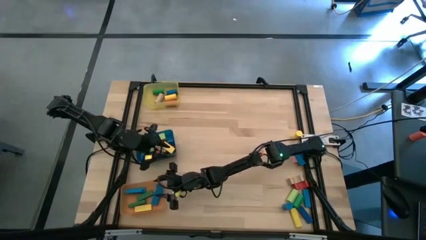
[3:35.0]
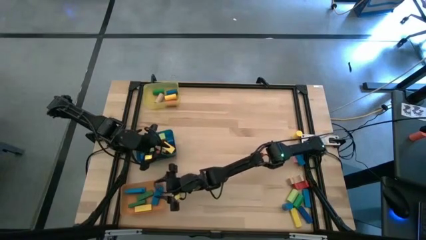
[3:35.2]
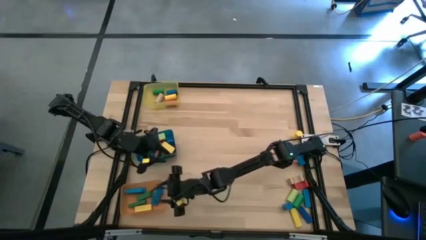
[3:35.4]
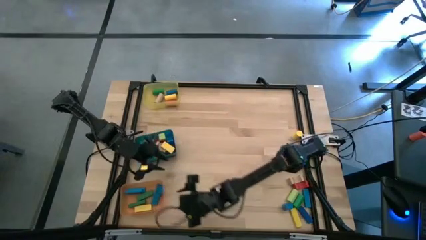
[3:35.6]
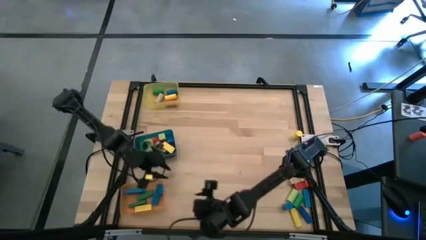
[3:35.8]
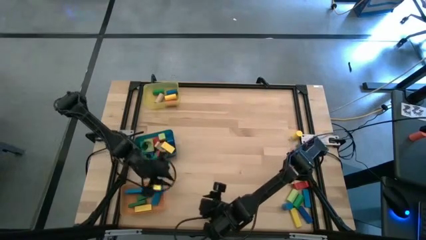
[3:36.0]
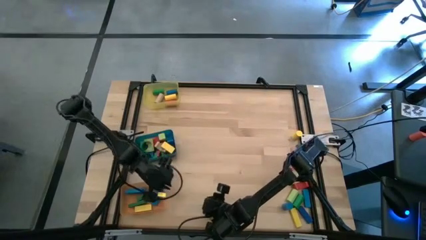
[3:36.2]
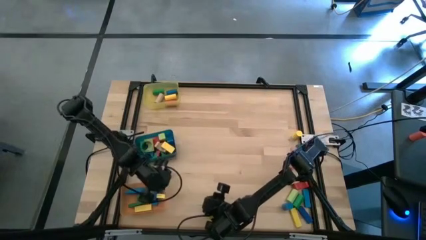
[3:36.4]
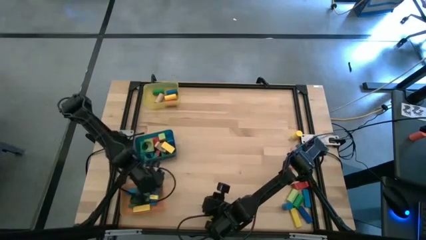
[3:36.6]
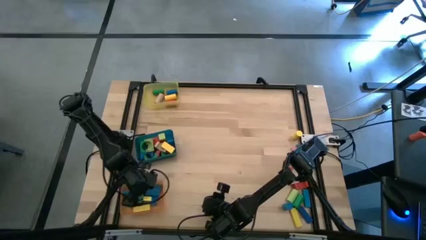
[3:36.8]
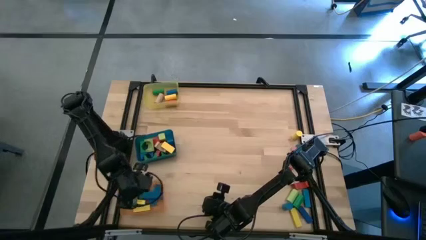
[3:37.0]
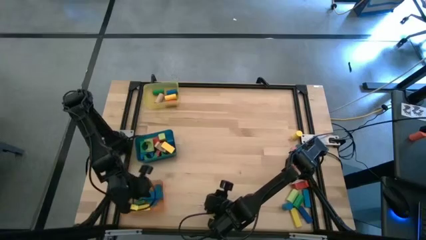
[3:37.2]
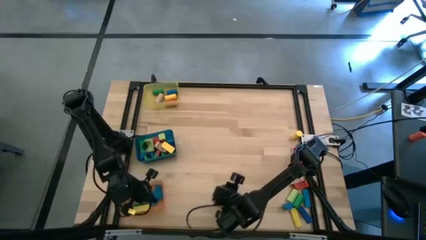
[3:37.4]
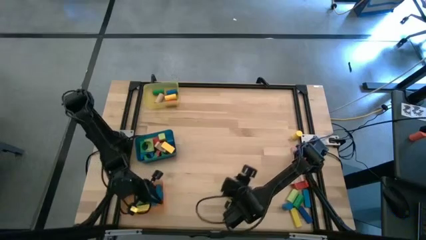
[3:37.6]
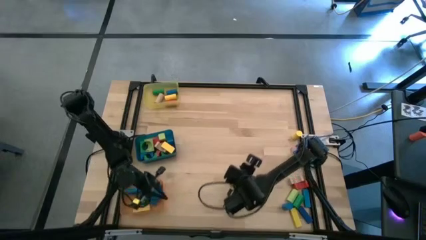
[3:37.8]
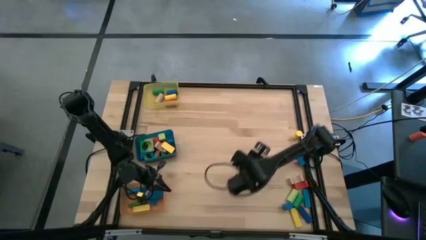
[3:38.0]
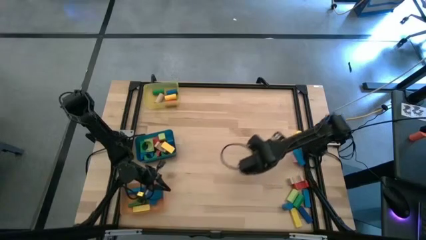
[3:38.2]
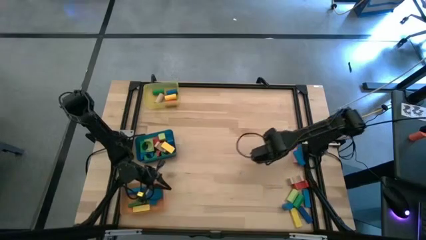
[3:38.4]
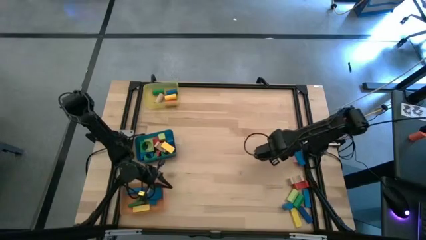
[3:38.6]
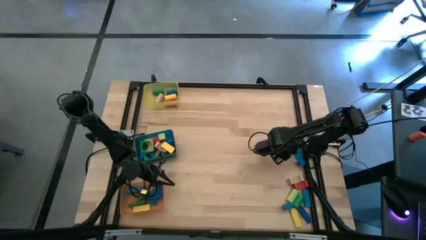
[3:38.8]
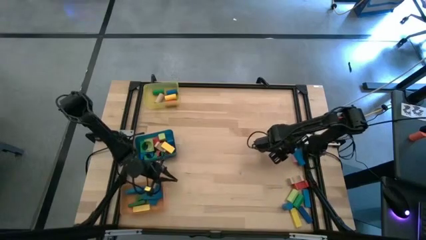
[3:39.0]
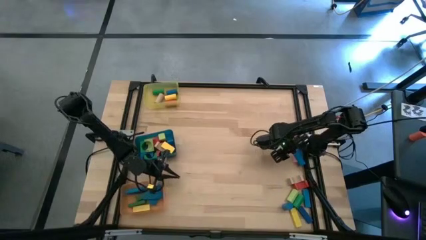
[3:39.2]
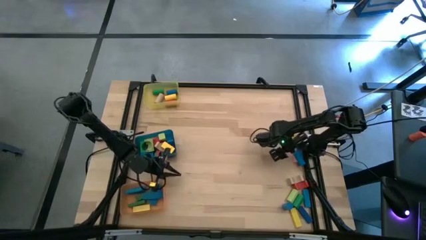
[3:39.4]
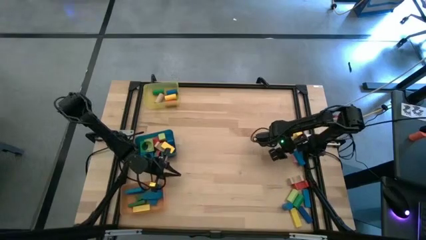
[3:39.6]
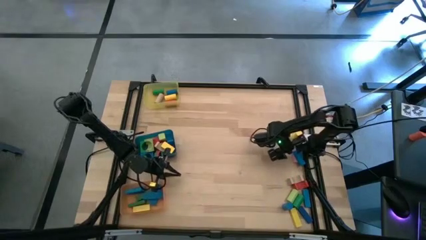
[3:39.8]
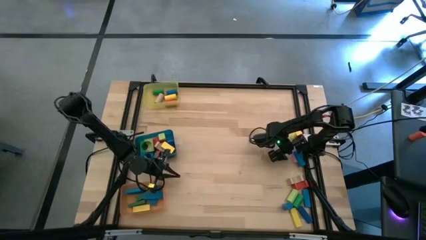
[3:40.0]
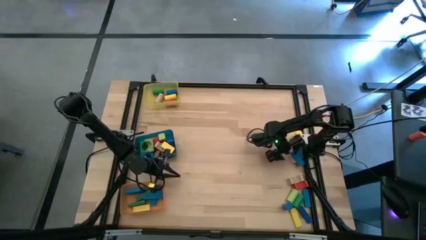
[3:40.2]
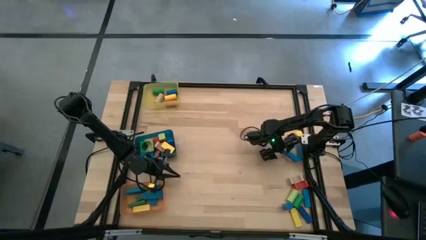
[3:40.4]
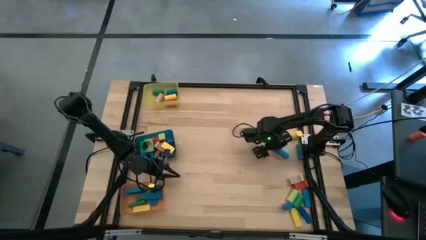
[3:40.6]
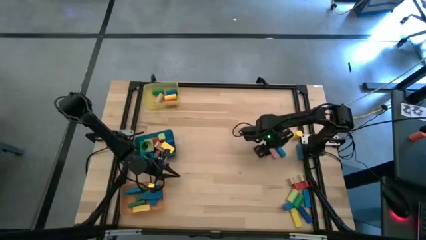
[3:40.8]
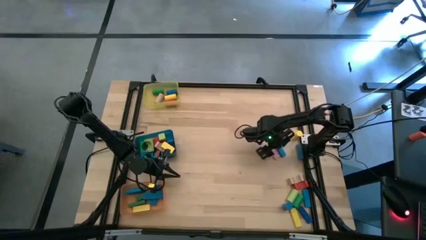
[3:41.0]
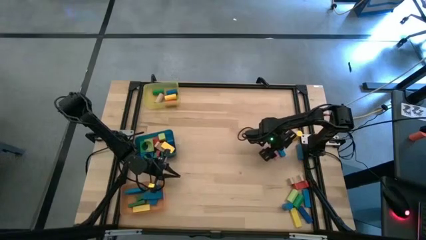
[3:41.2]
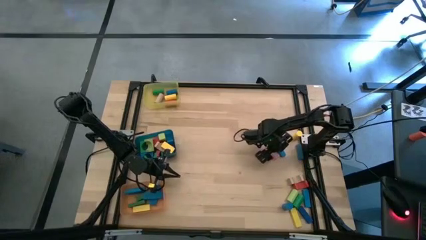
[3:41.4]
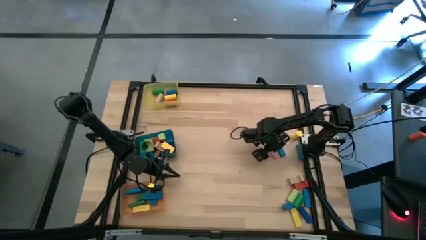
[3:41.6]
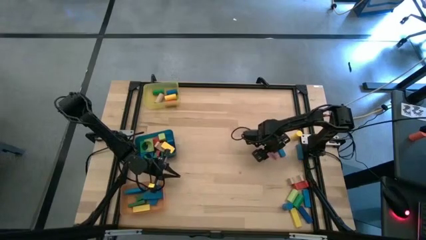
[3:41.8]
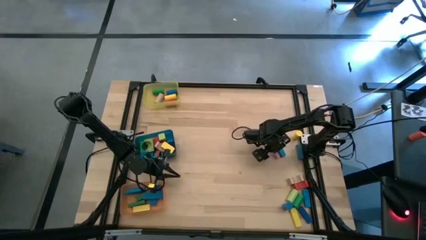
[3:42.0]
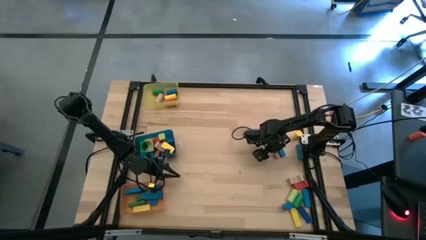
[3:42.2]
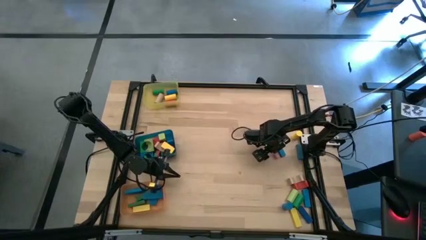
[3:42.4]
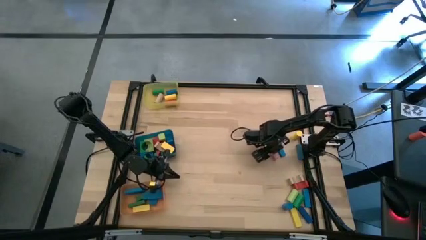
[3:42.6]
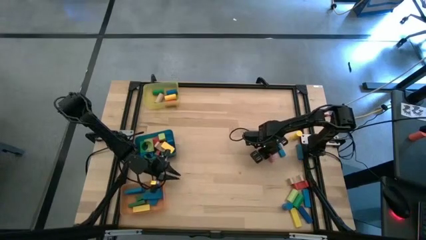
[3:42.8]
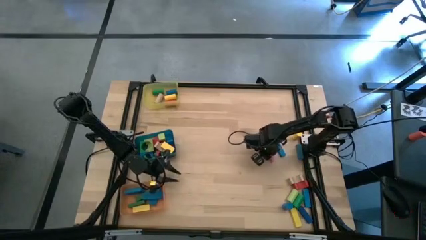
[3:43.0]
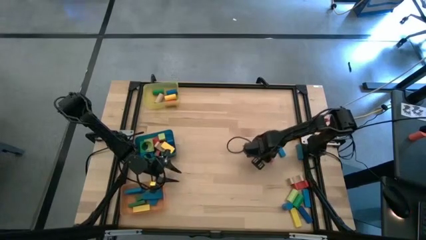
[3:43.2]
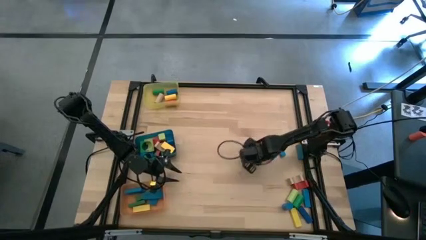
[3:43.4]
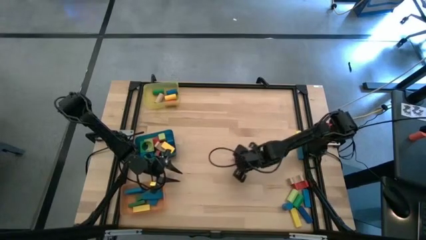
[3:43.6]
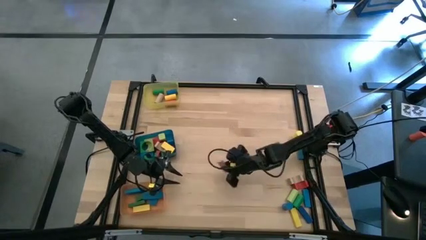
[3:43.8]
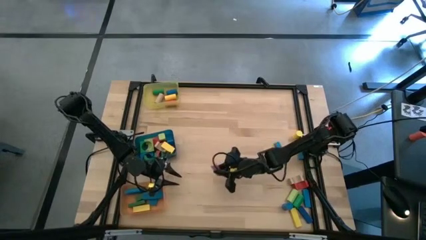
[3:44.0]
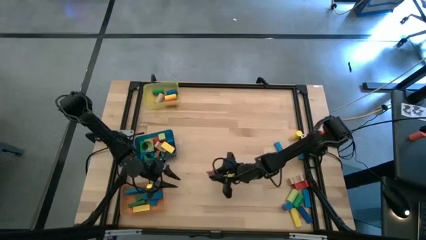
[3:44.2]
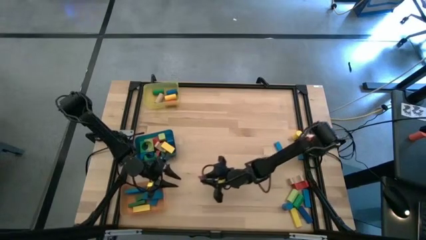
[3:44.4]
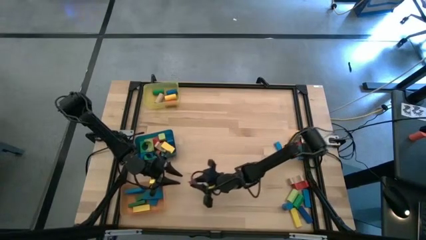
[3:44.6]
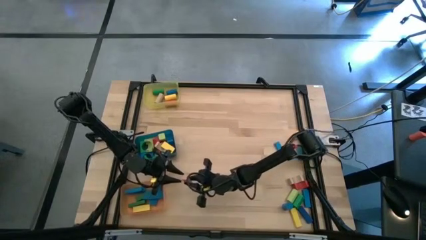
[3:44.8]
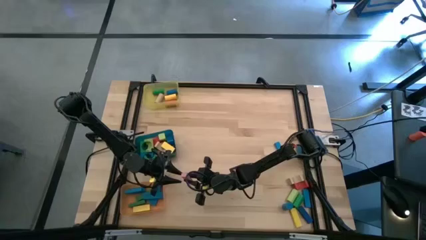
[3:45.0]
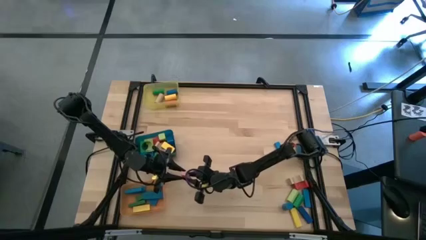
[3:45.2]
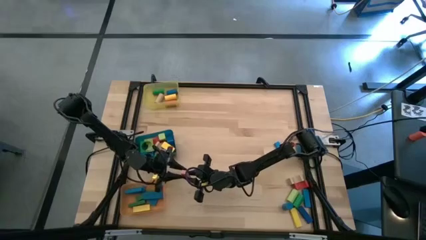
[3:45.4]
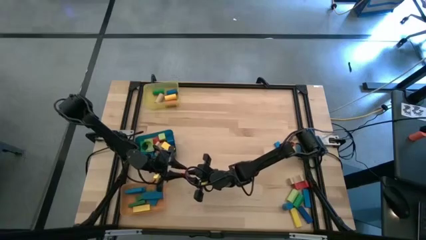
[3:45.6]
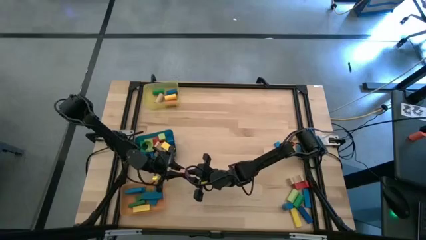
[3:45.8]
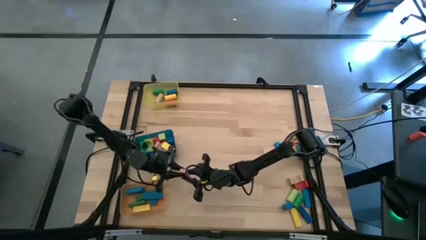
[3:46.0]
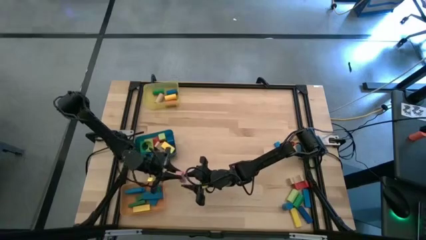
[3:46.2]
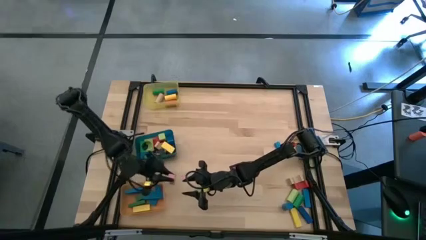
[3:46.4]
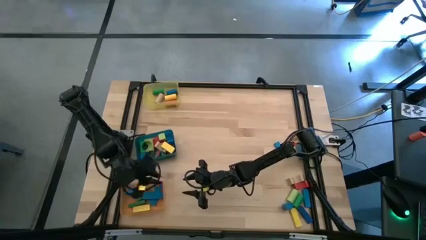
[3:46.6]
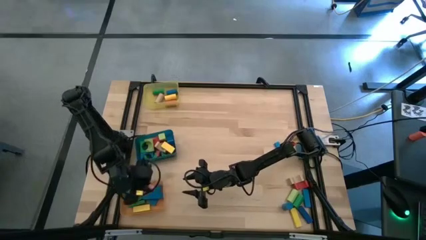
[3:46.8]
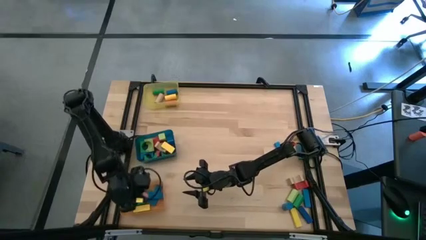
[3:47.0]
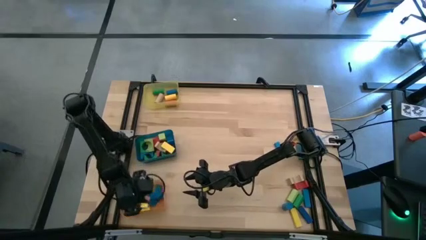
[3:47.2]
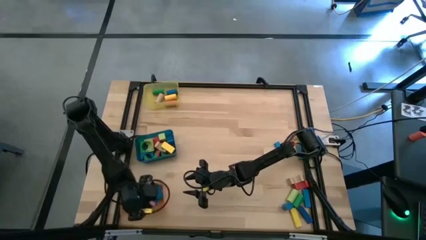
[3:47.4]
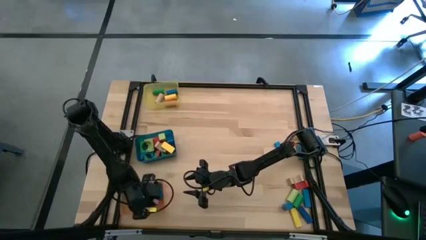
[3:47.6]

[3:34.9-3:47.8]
Task: Sort blocks by size
Put the pink block into the orange bin

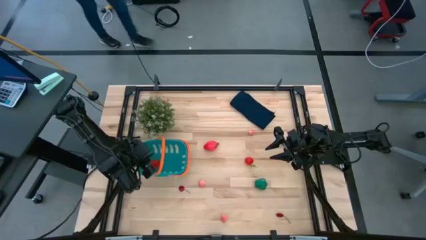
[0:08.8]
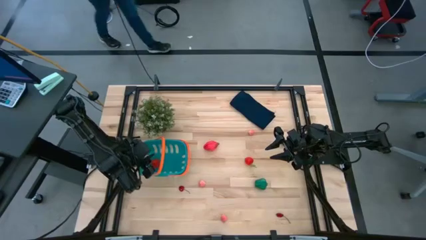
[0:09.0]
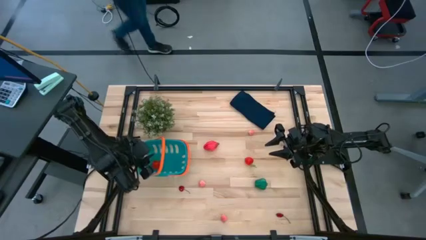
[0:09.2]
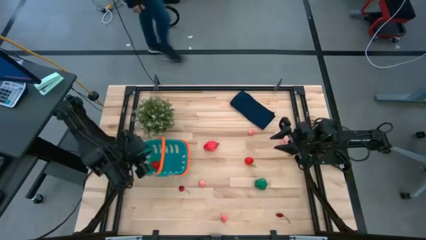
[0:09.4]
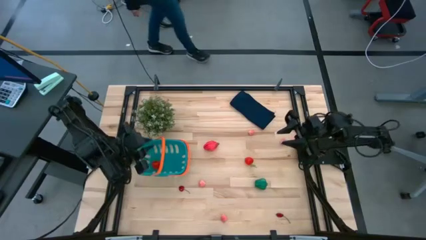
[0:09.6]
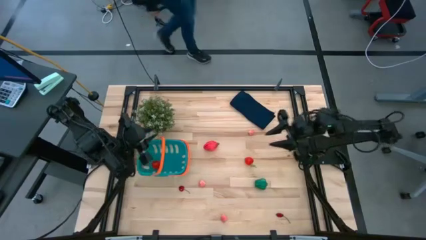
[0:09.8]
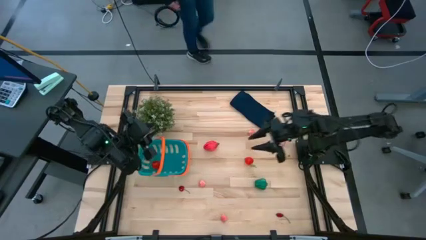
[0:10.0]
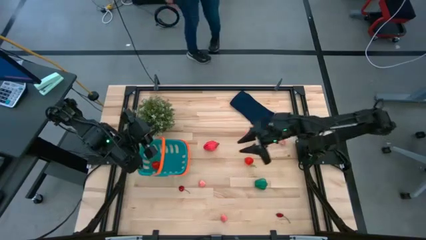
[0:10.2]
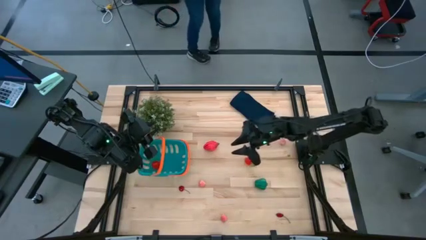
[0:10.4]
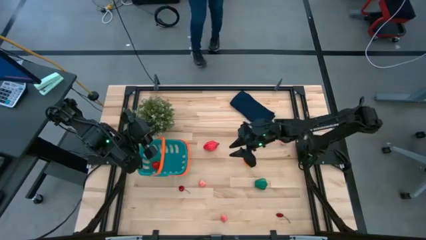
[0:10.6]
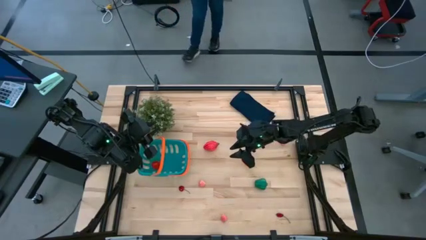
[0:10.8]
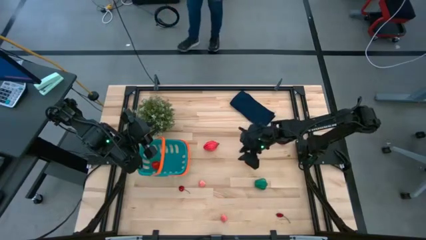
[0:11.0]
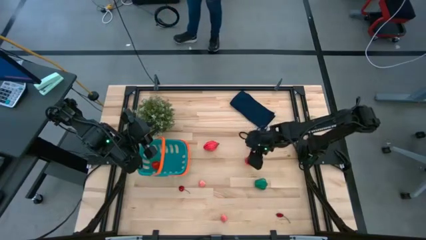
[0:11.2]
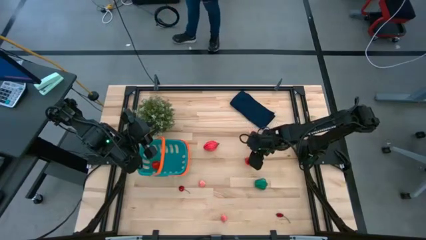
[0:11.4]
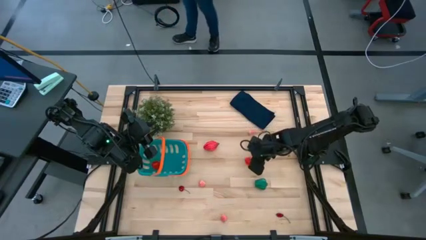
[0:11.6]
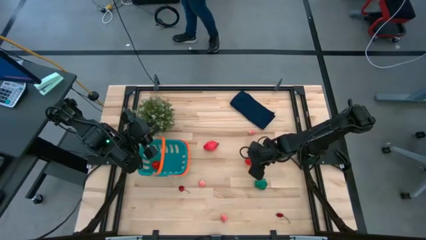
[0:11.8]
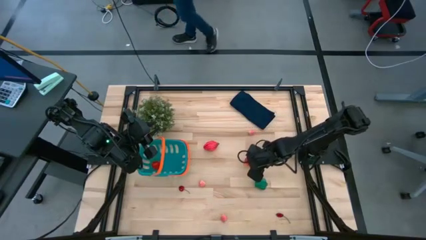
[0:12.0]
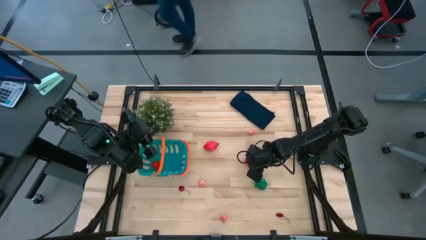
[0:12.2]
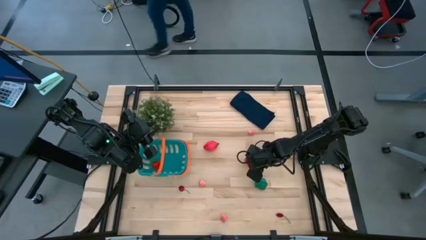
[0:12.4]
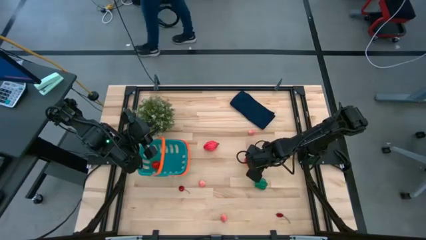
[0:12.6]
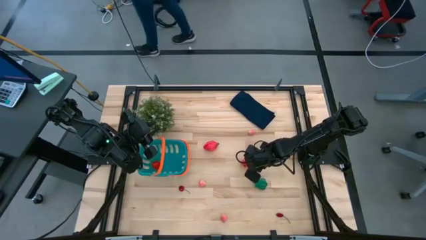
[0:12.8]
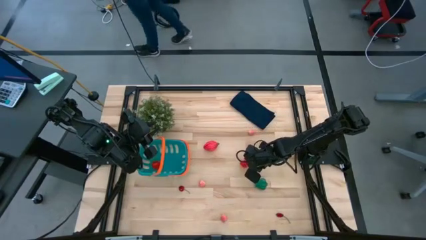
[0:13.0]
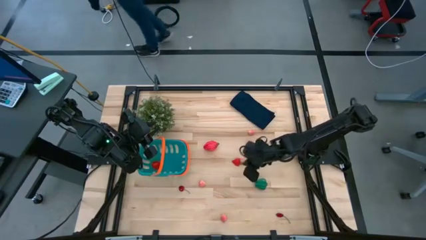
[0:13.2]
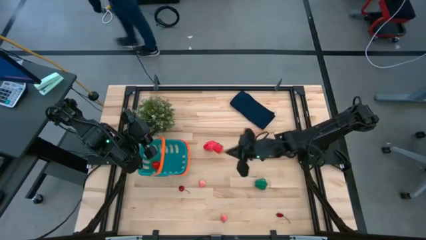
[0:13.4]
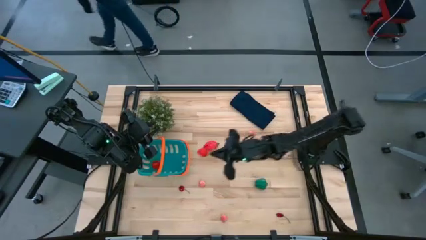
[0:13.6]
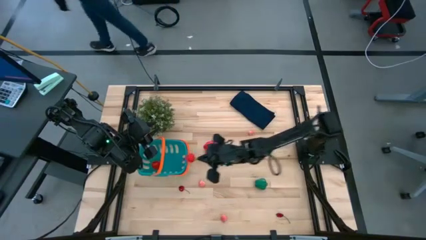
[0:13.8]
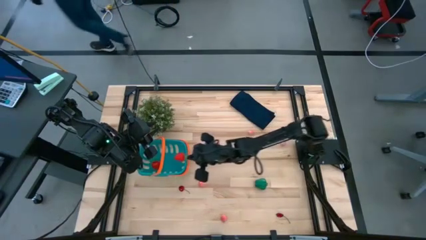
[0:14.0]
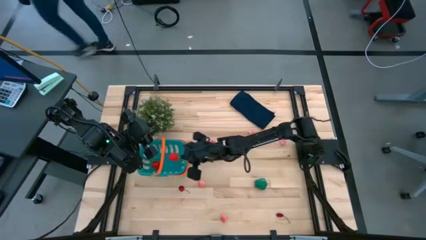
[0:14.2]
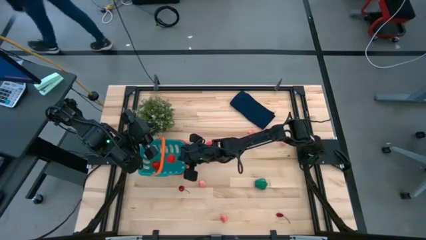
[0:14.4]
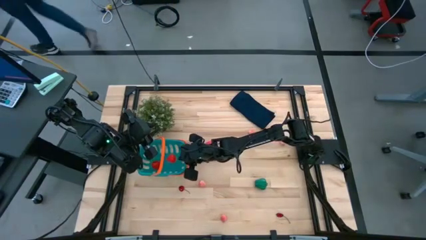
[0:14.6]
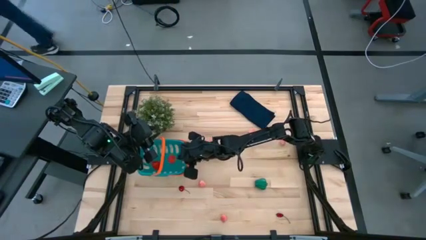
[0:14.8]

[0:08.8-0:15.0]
Task: Pick and placing Produce into tupperware
Put the strawberry into the green basket
